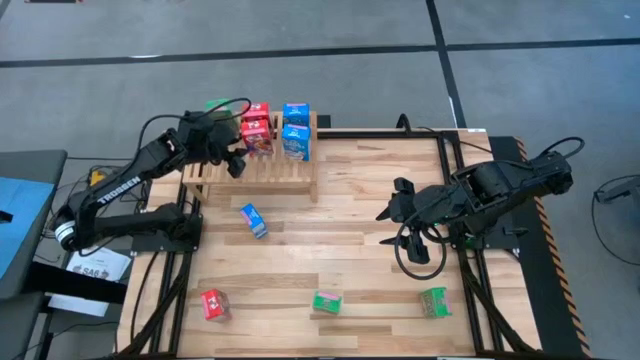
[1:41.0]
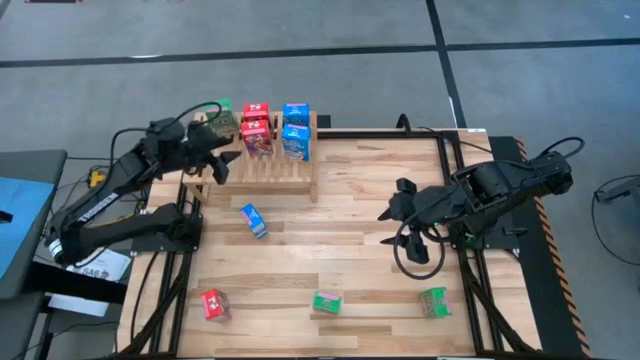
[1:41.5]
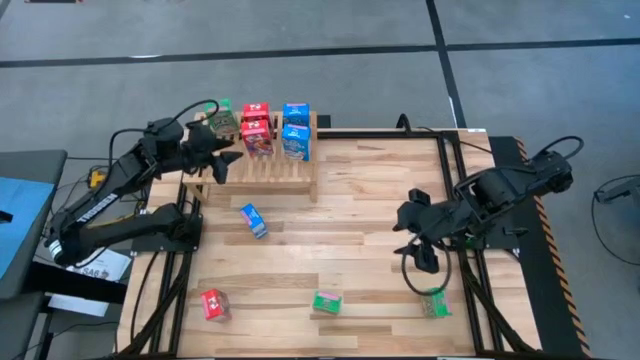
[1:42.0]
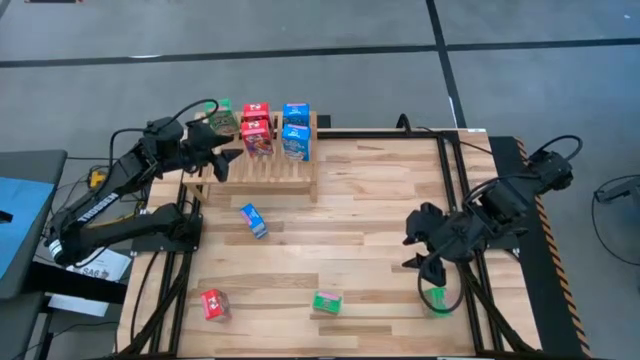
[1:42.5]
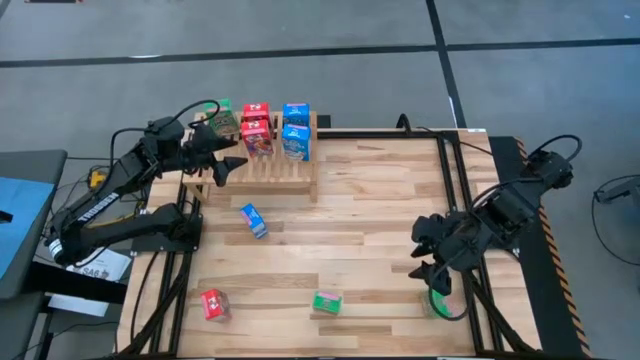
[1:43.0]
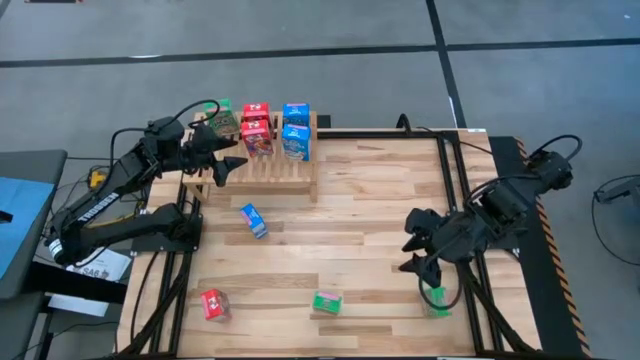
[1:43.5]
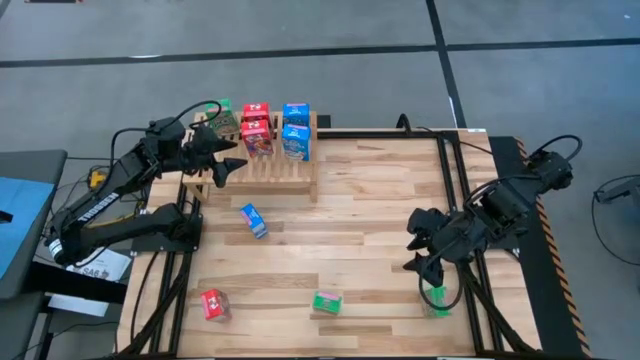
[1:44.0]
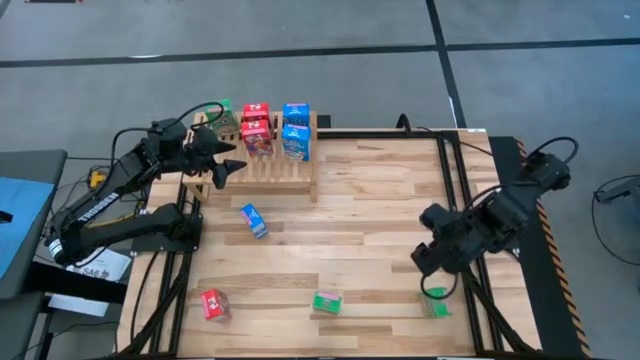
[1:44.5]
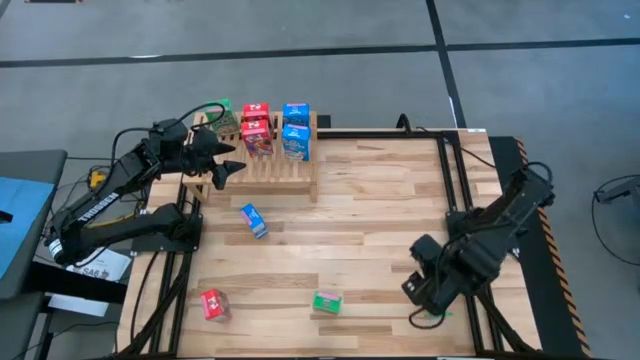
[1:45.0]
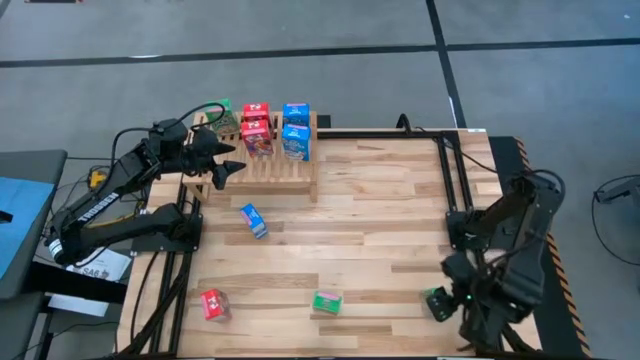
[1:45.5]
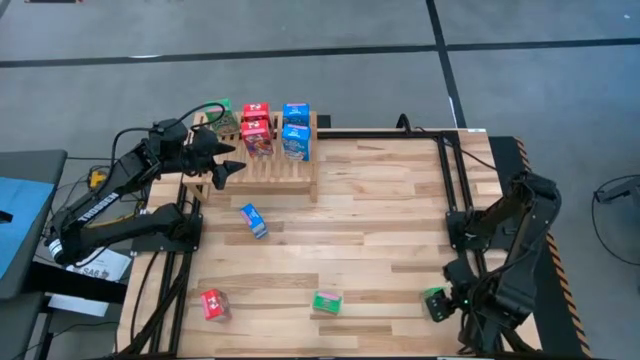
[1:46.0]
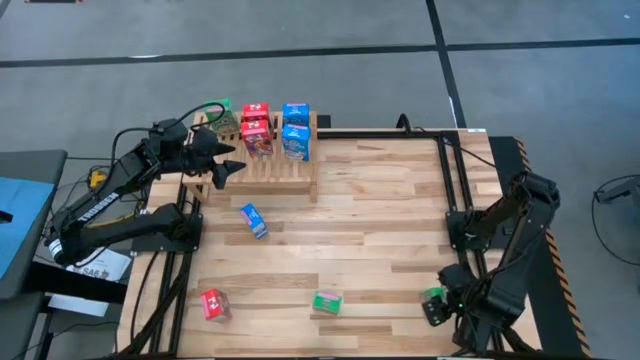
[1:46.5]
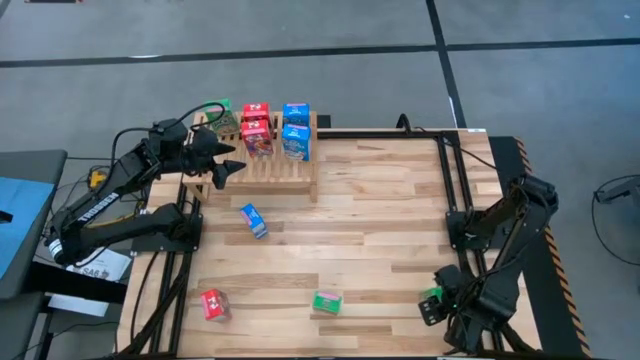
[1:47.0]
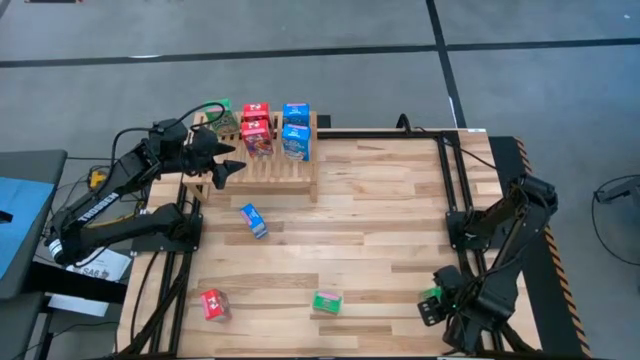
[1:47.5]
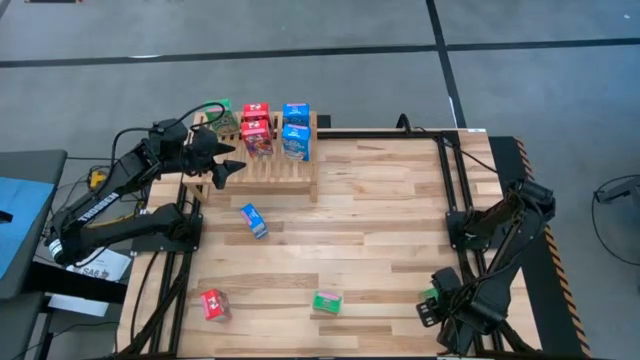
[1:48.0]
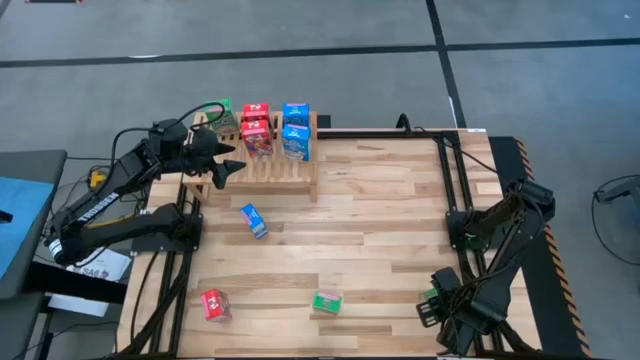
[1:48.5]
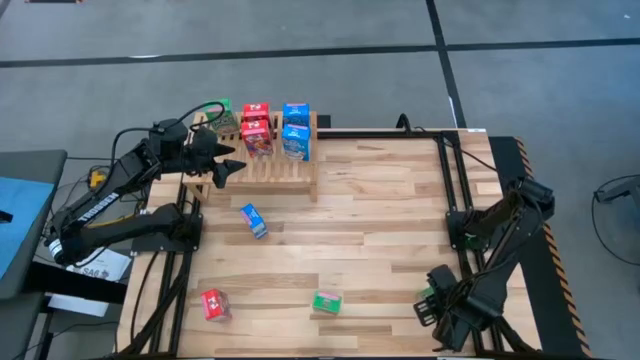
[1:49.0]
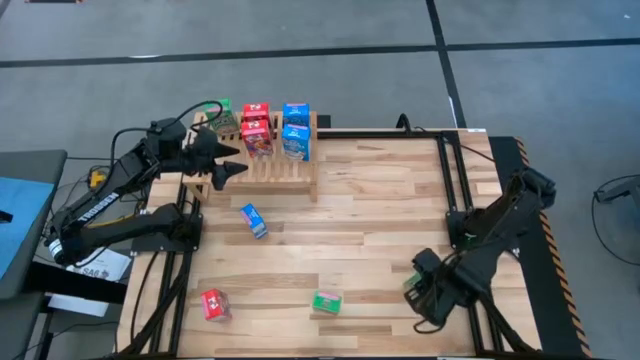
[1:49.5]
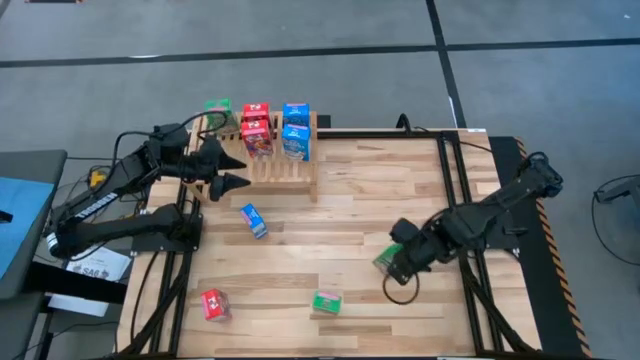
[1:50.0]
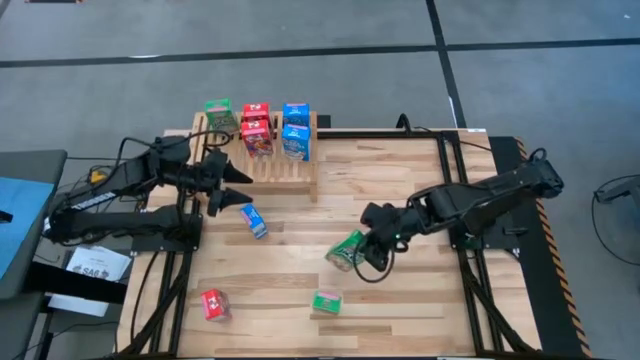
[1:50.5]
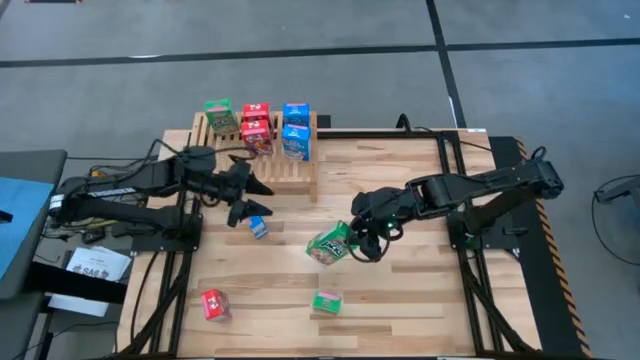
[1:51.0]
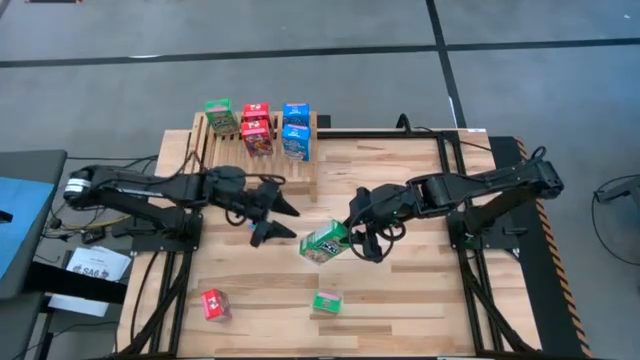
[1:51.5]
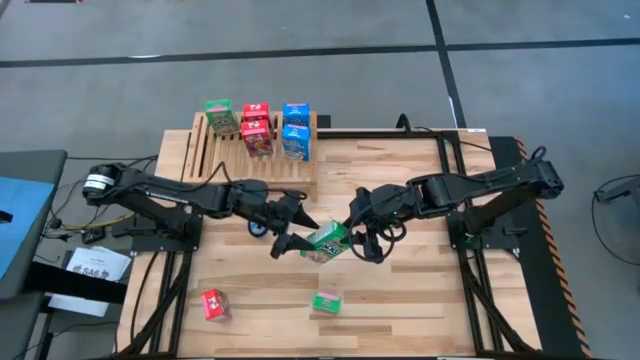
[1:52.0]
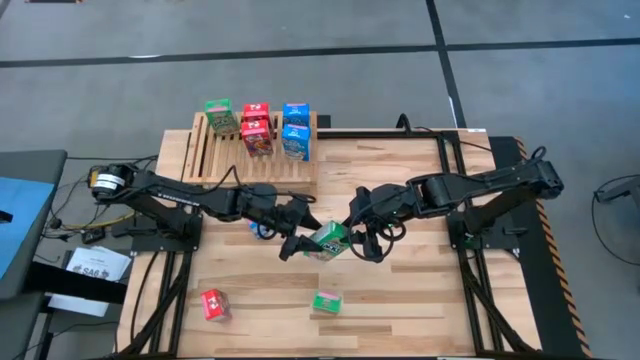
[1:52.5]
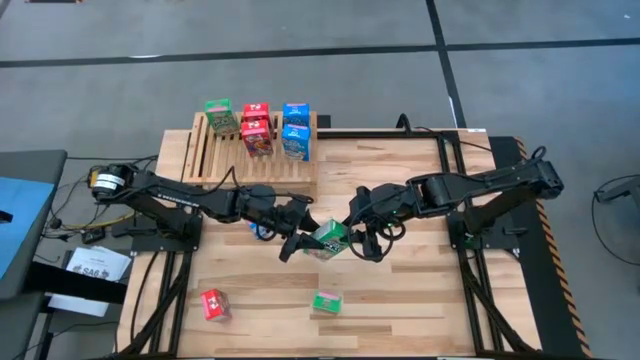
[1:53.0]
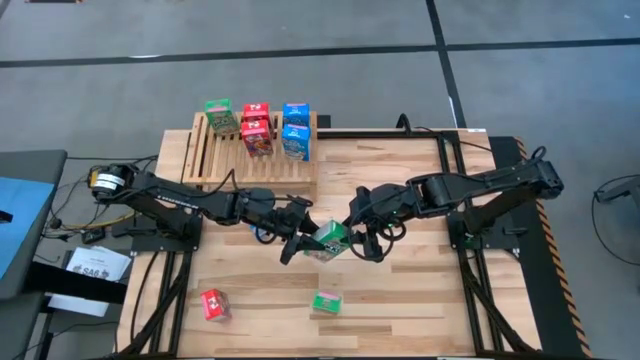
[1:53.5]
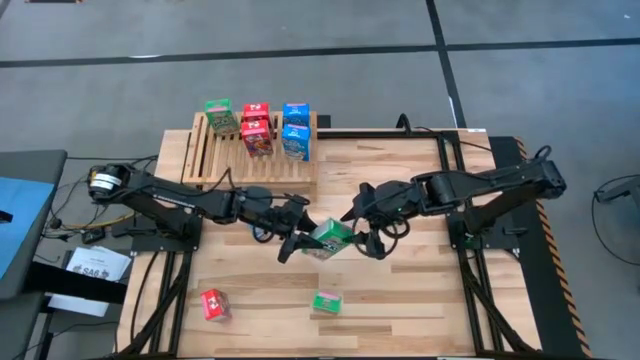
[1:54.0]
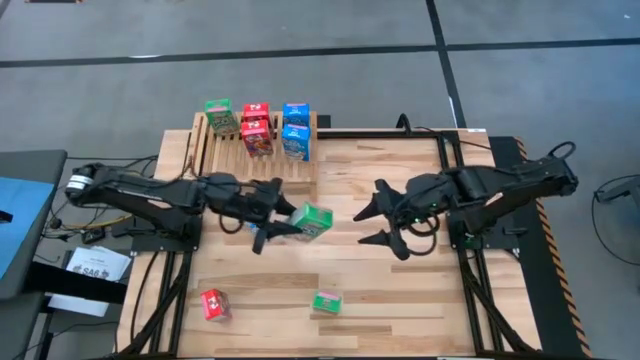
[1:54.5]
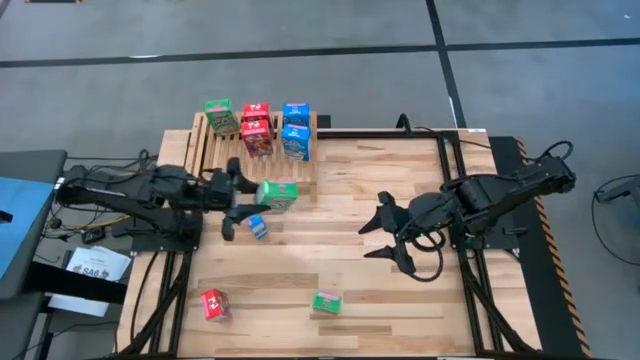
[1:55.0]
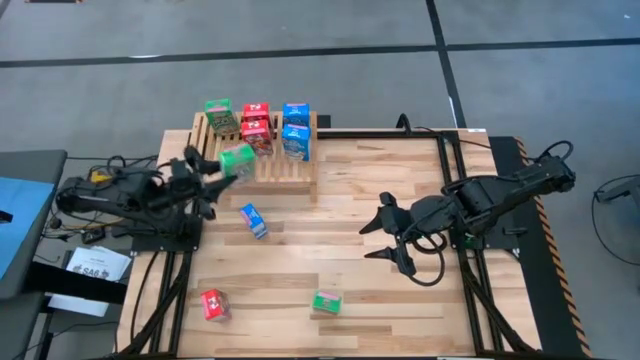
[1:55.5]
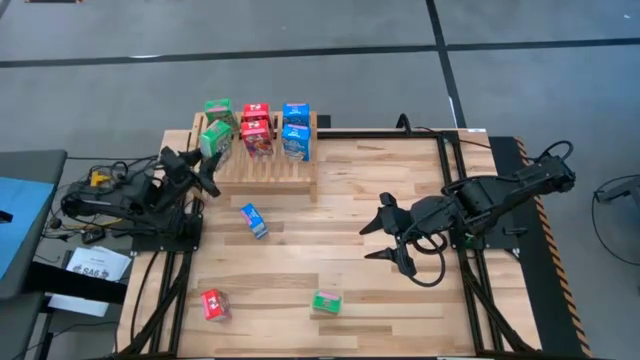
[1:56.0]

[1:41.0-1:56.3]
Task: Stack cereal on shelf
Put the right green cereal box on the shelf aligned with the other green cereal box

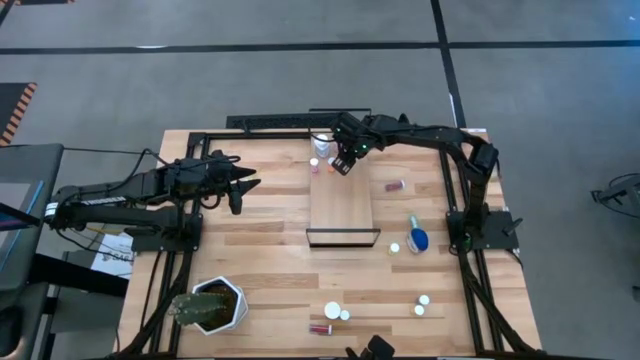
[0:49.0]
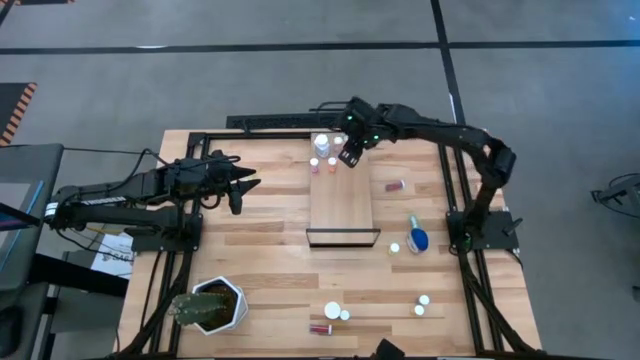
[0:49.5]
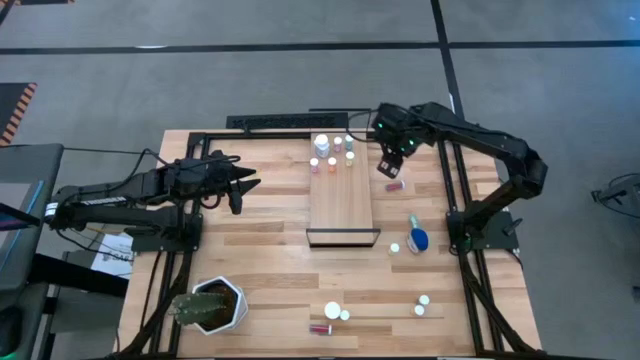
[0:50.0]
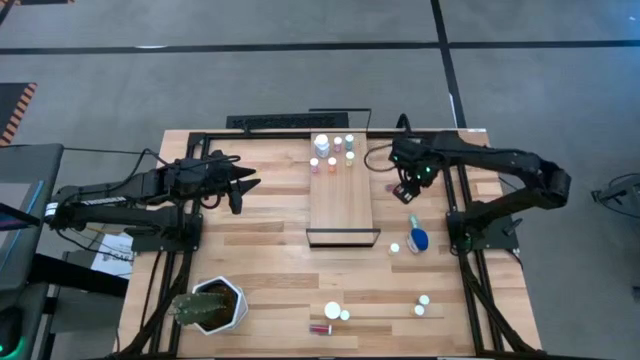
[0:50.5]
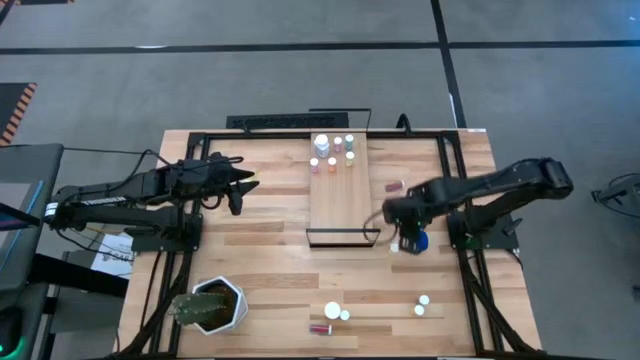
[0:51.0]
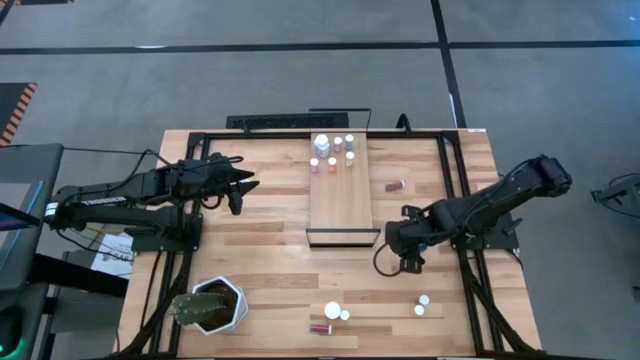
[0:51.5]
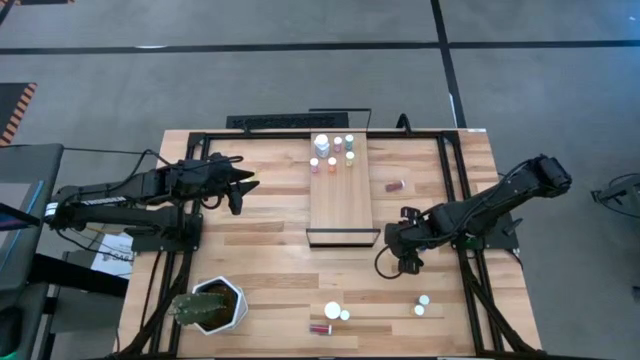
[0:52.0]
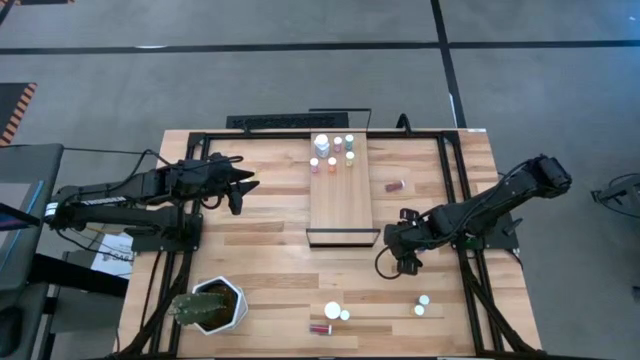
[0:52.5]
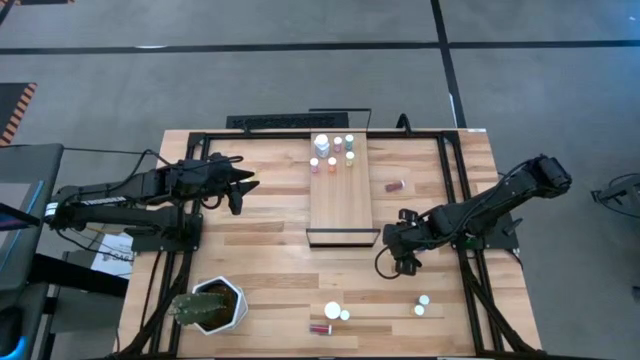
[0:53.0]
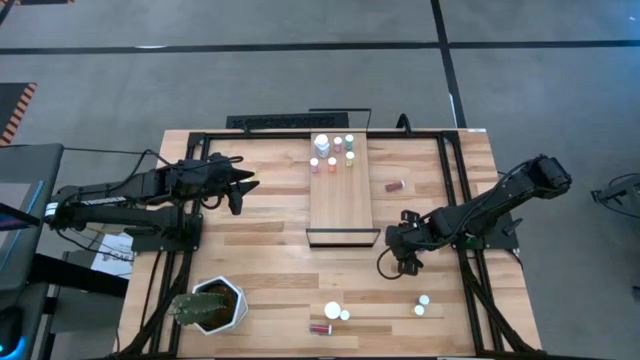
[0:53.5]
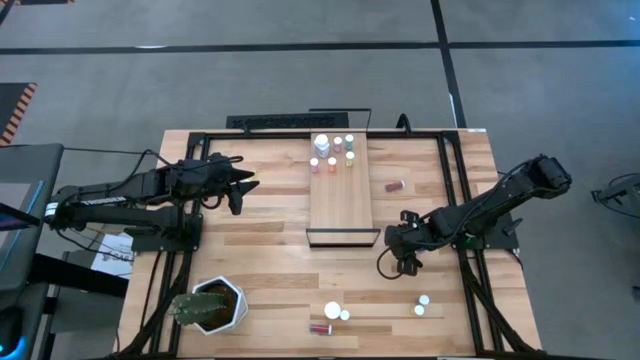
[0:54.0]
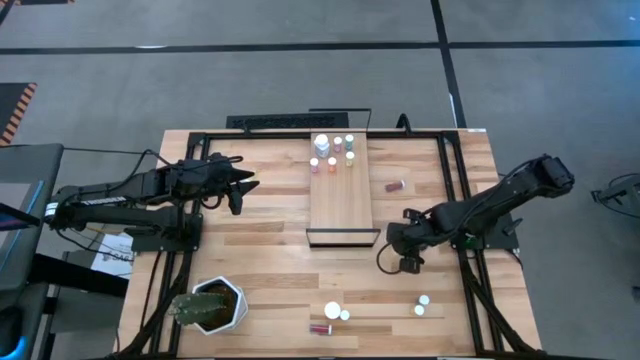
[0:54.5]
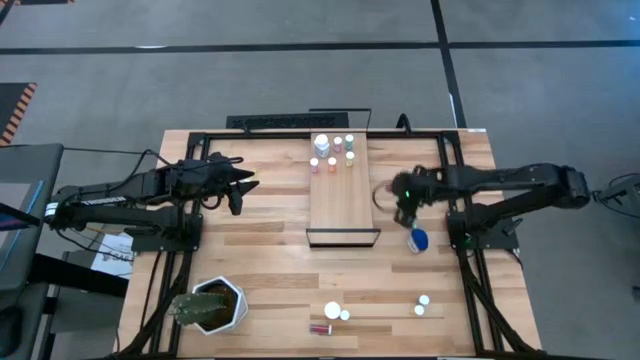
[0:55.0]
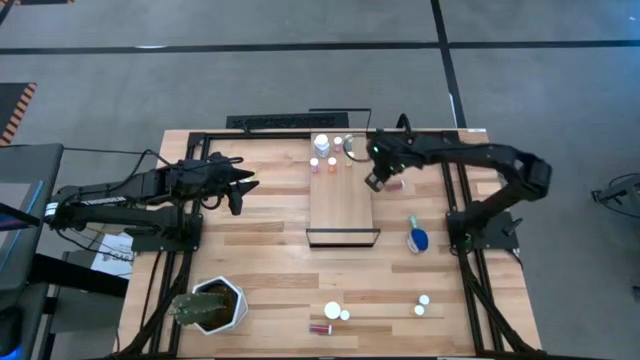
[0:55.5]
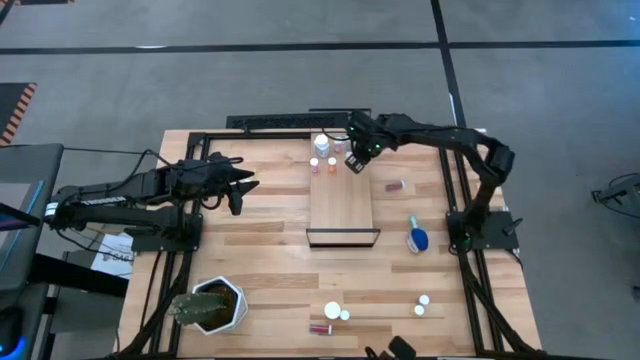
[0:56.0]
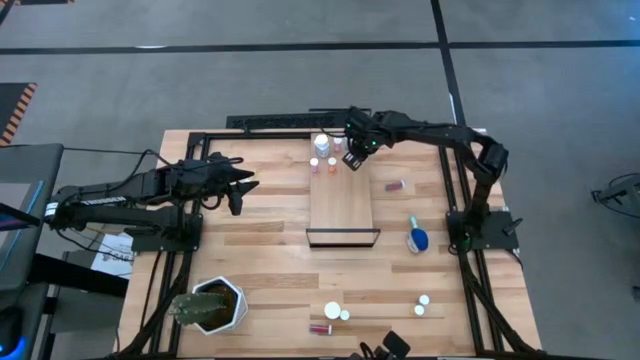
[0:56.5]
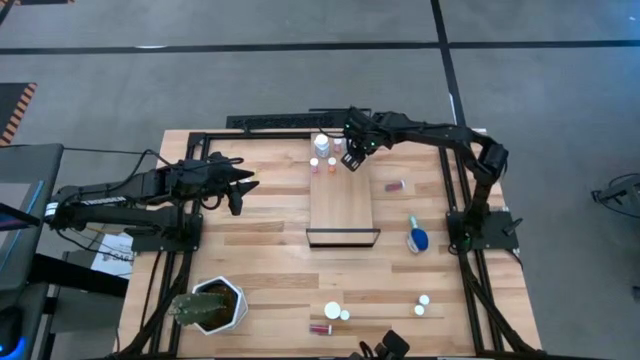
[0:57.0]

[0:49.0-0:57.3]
Task: Pick and place medicine bottles onto shelf by color
Put the yellow pill bottle on the shelf
